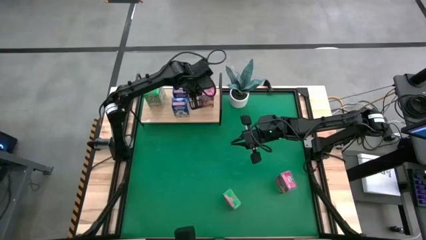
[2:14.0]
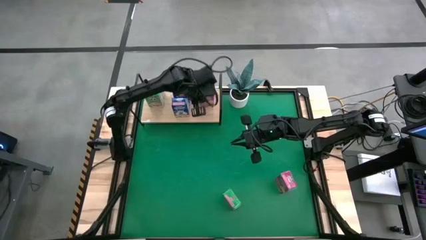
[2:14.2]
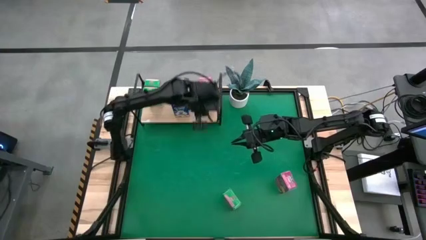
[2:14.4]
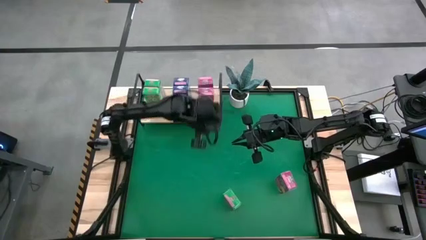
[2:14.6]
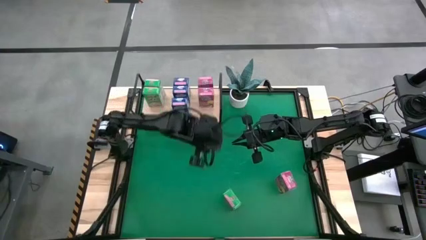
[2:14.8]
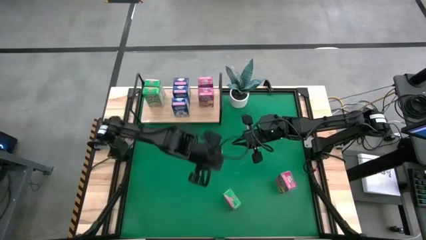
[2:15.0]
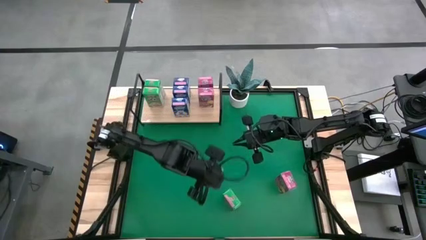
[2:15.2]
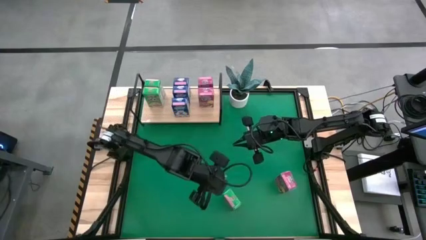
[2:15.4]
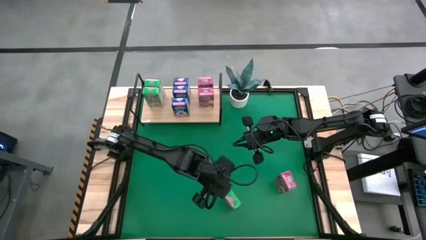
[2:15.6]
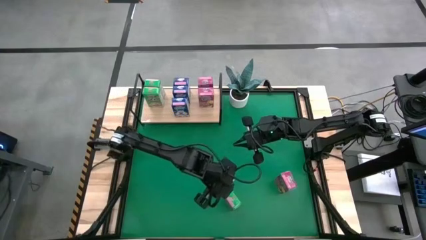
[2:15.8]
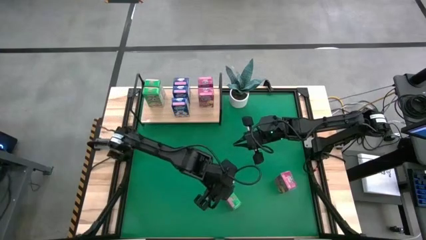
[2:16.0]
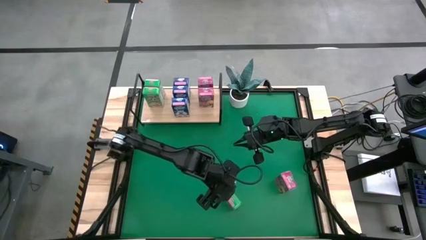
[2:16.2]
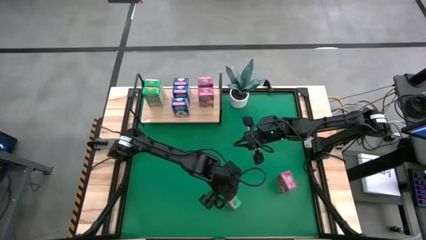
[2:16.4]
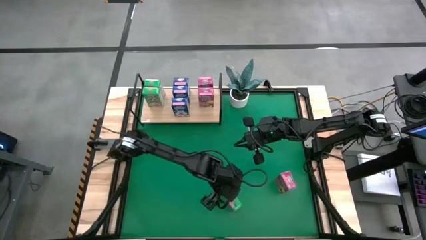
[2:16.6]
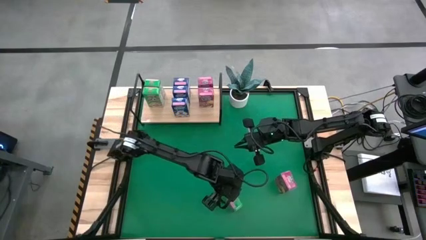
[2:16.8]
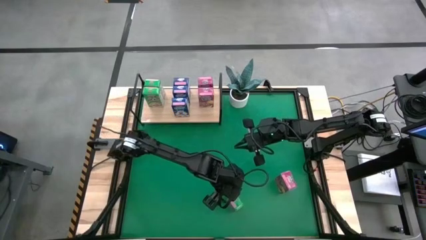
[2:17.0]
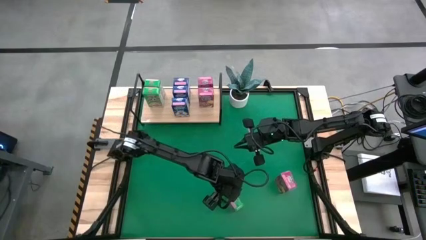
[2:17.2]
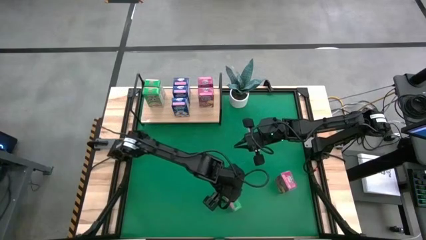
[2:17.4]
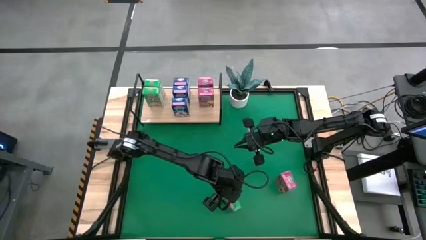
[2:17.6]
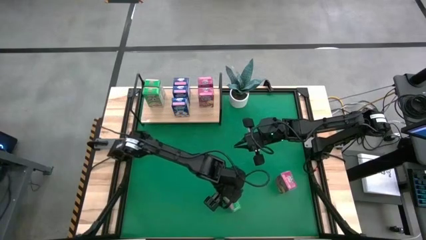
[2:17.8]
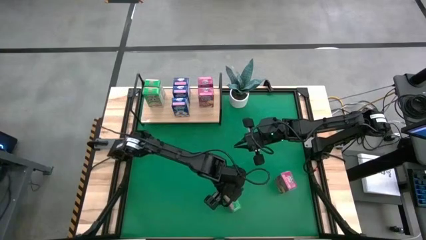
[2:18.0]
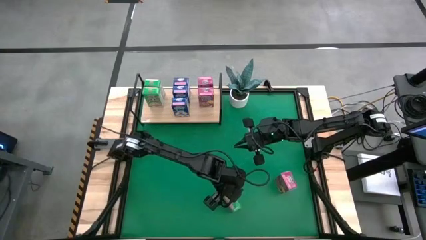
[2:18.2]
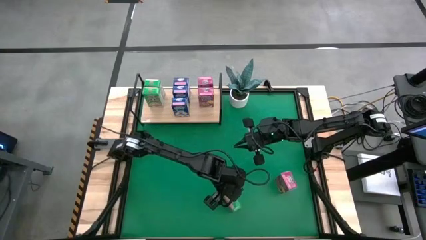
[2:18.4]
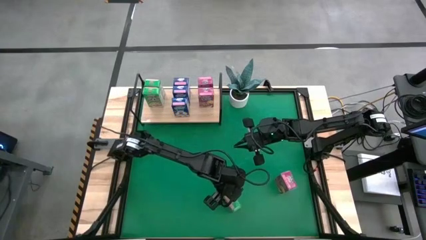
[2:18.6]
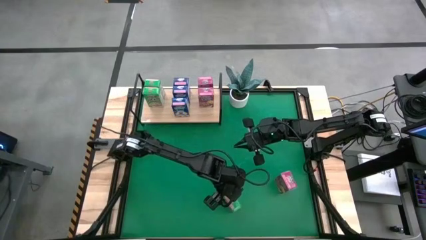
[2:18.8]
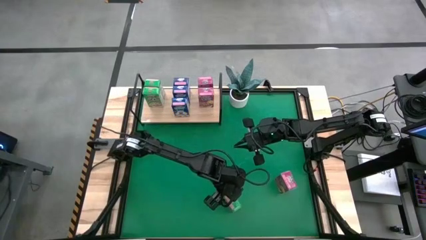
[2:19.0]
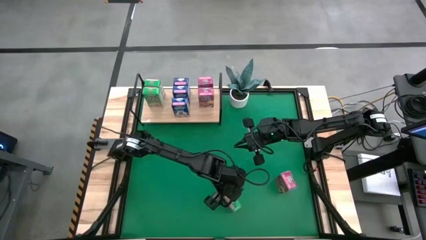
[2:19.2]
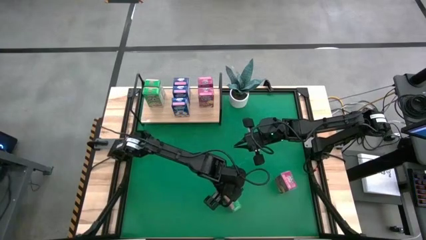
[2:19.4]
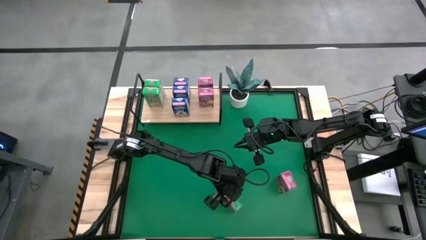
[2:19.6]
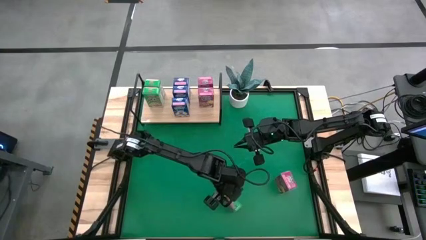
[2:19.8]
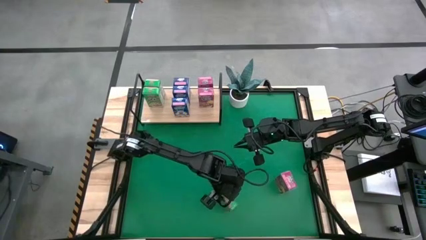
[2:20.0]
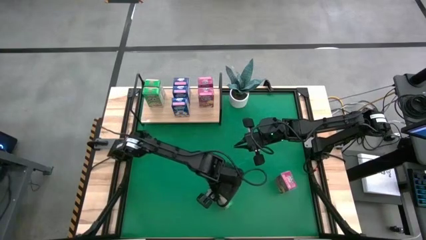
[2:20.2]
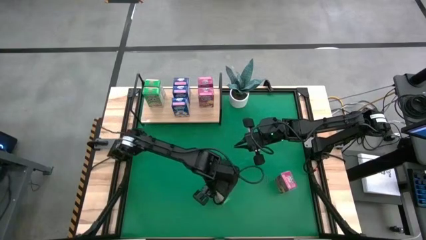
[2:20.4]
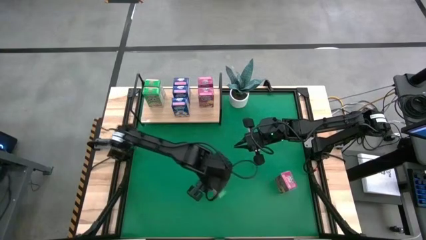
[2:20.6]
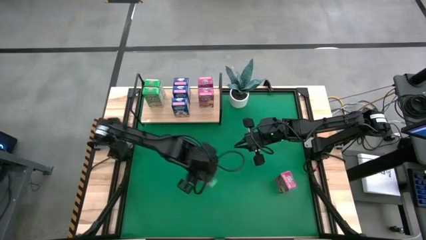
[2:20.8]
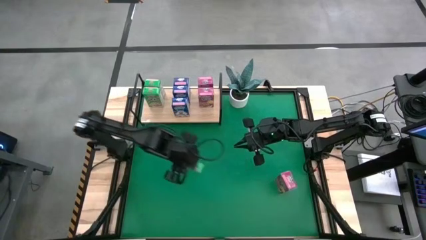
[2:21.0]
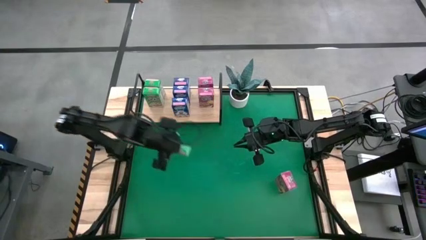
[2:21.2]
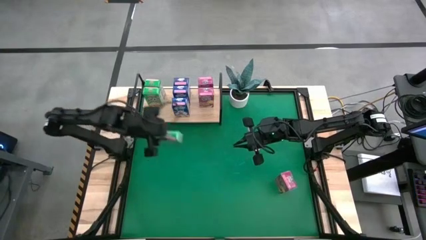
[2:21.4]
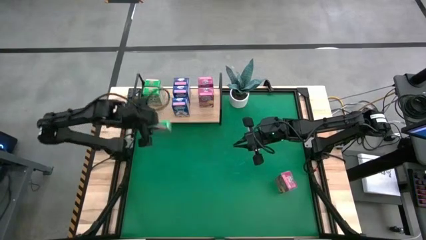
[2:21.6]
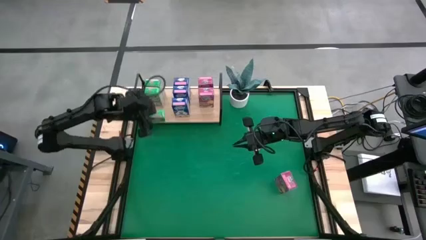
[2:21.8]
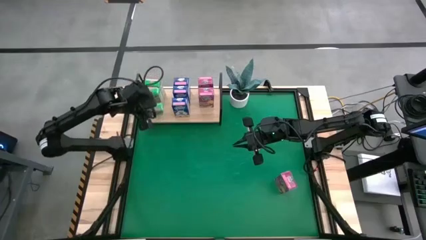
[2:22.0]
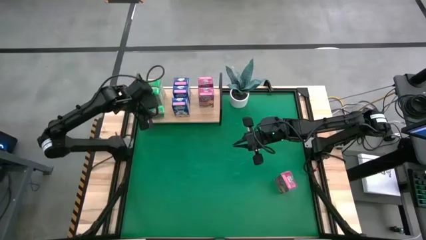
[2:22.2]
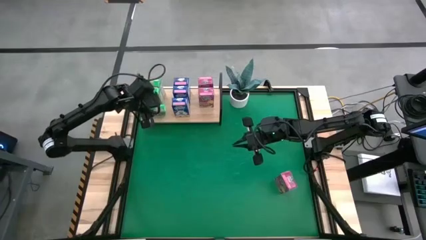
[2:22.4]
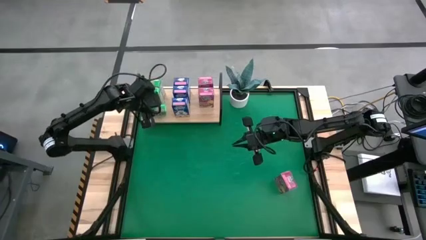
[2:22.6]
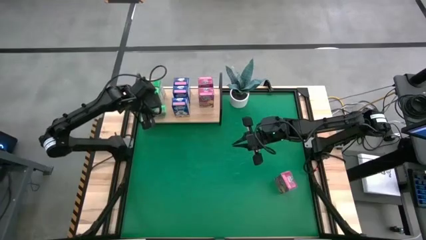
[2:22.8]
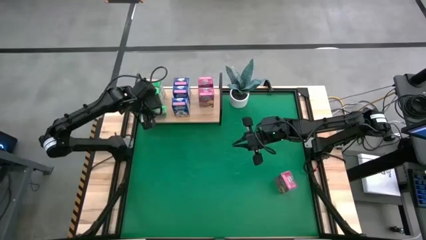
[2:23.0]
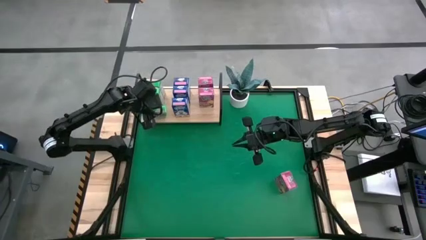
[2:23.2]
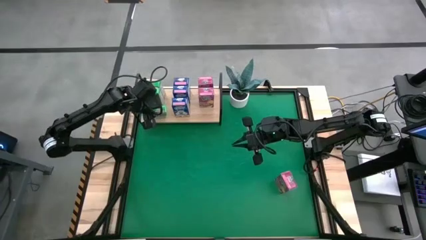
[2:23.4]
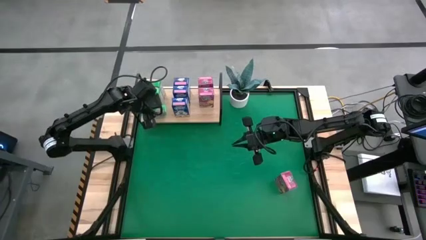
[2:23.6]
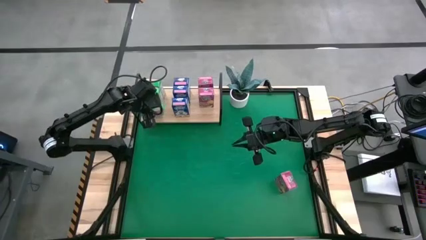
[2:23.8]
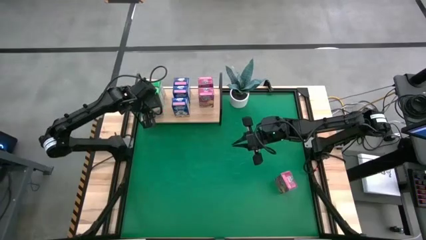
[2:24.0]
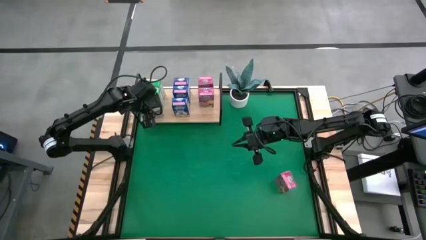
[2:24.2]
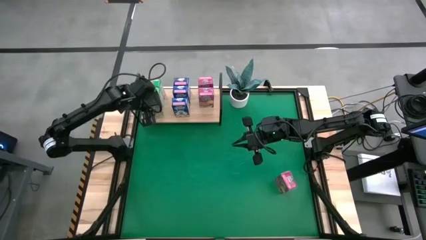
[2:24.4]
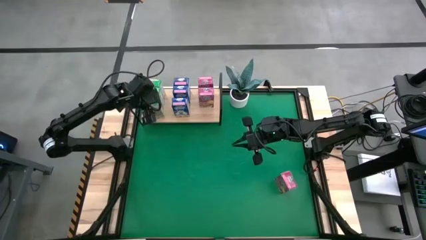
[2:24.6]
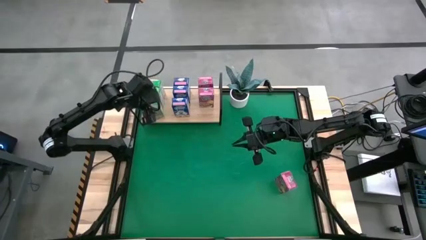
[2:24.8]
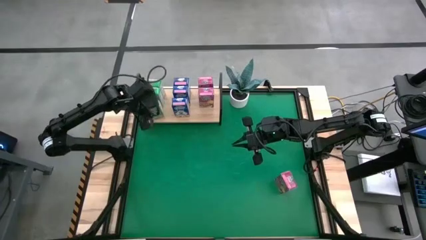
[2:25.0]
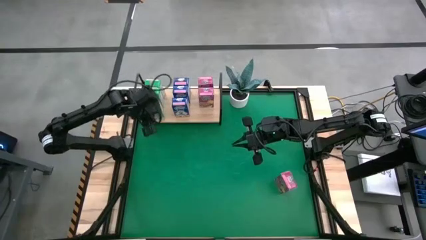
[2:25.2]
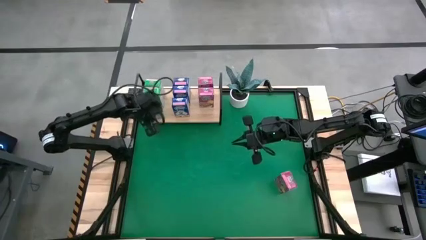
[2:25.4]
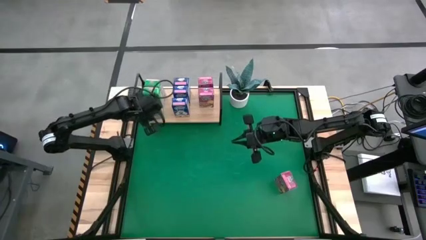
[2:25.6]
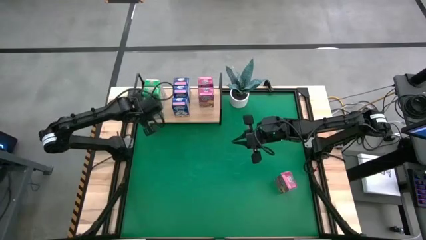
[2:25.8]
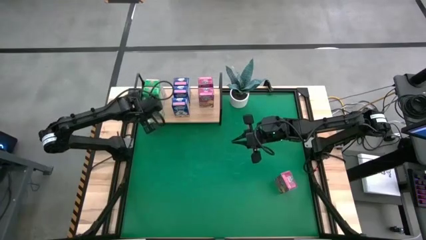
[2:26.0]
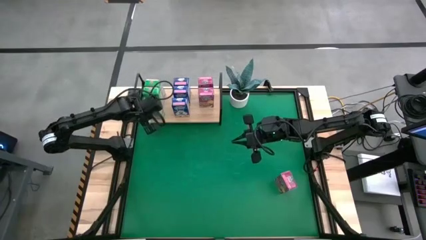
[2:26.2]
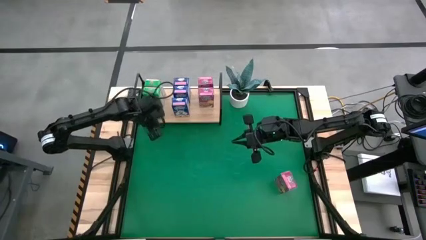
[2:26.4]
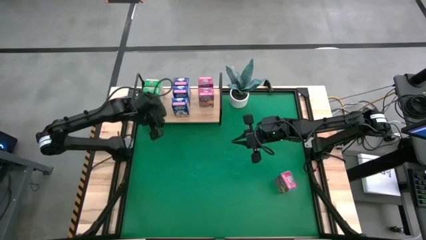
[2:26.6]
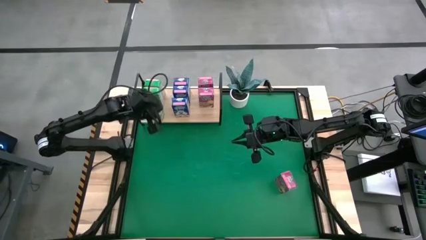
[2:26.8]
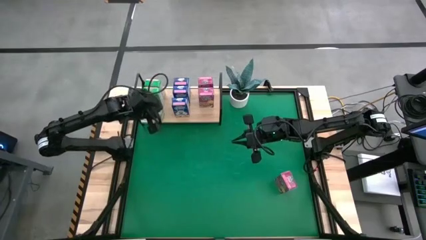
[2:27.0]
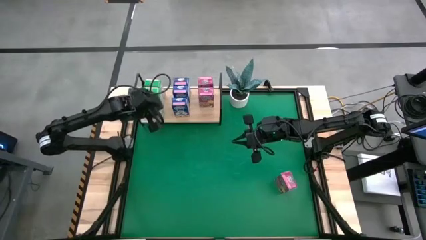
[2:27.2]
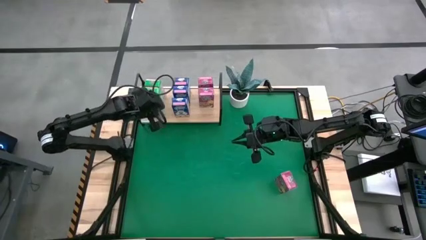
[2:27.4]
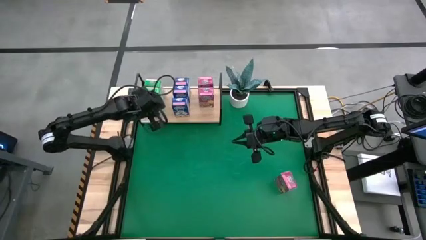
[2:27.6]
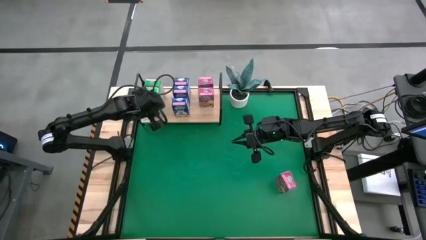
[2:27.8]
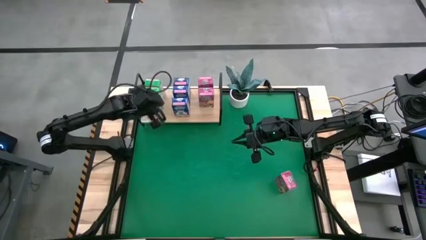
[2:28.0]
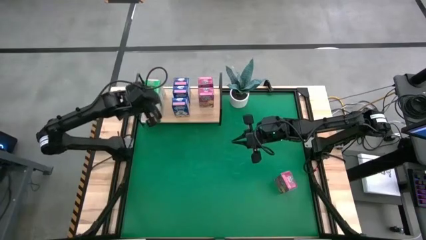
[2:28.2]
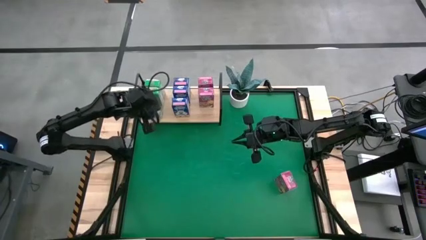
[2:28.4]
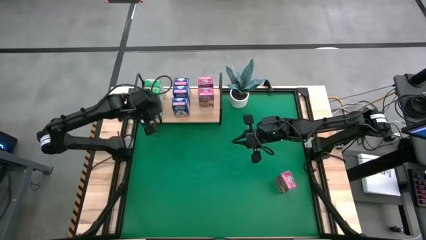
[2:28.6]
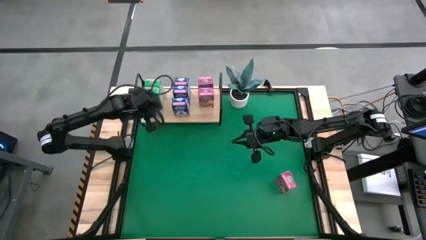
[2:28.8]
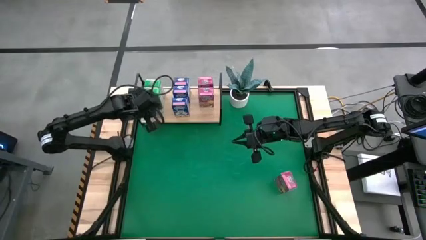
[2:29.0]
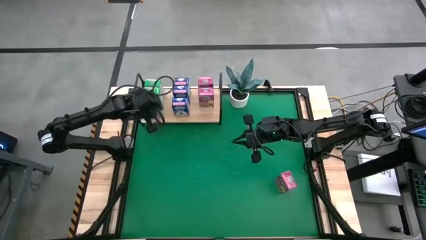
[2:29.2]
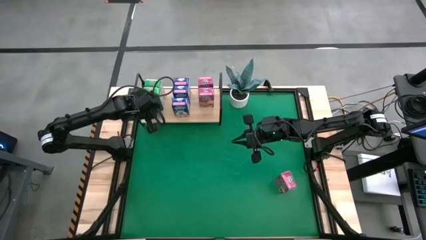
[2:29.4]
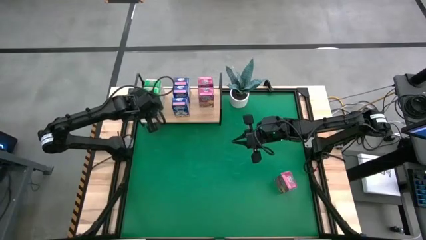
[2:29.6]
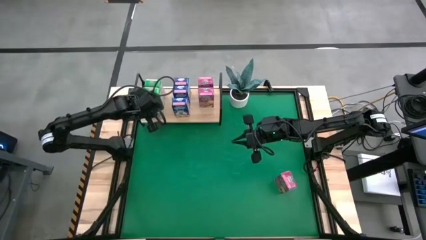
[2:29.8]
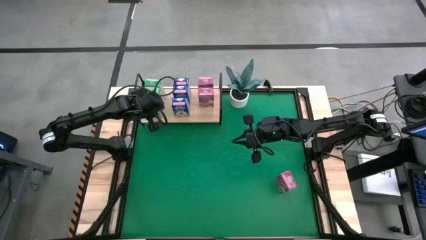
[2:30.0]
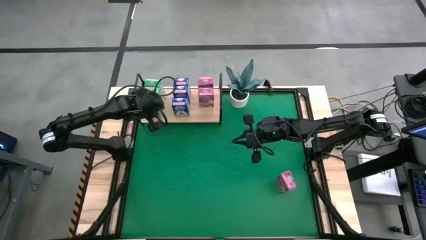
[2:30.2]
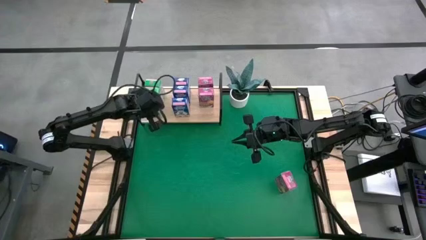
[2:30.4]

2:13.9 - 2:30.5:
Task: Stack cereal on shelf
Put the green cereal box on the shelf aligned with the other green cereal boxes
